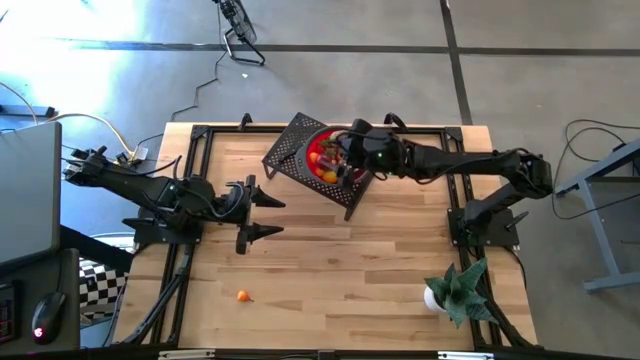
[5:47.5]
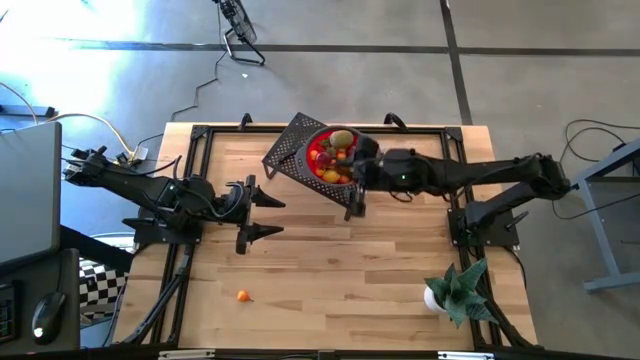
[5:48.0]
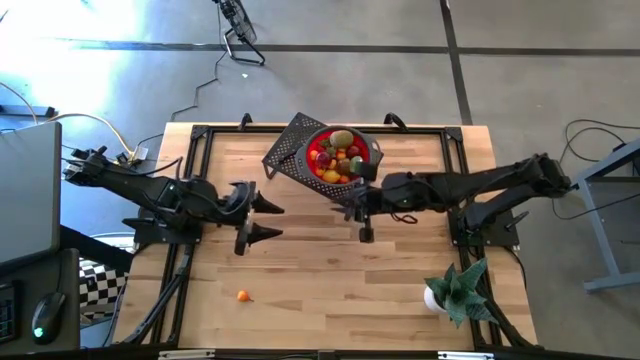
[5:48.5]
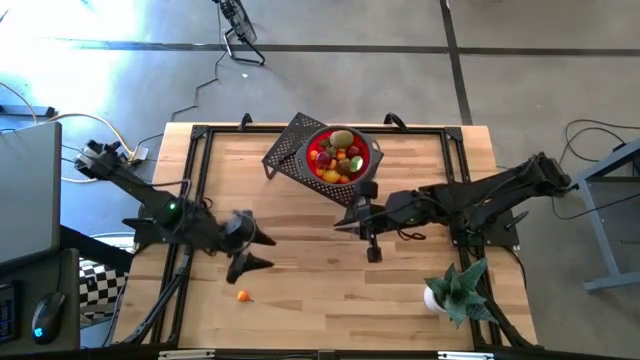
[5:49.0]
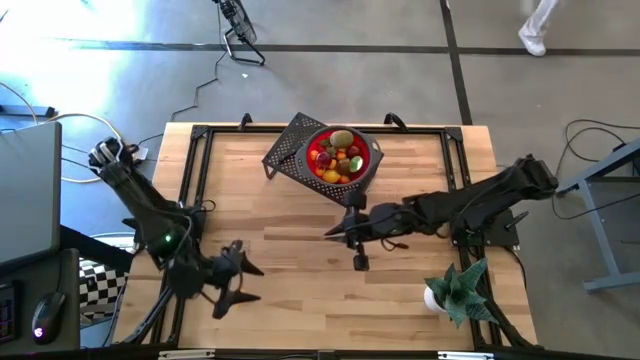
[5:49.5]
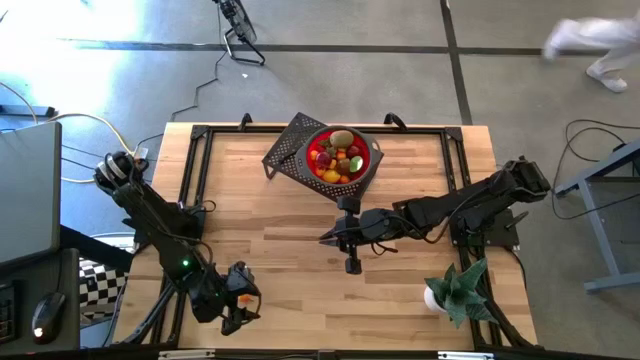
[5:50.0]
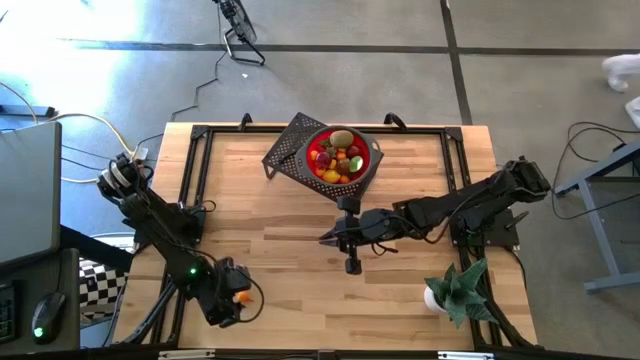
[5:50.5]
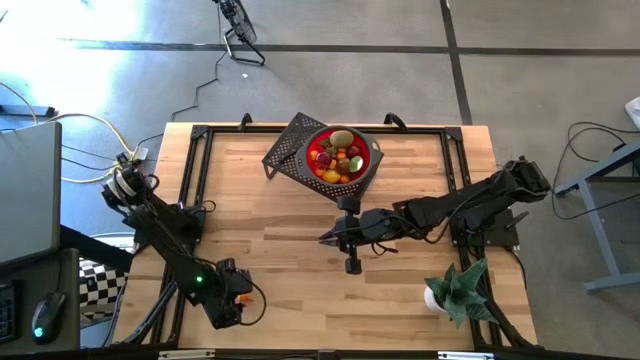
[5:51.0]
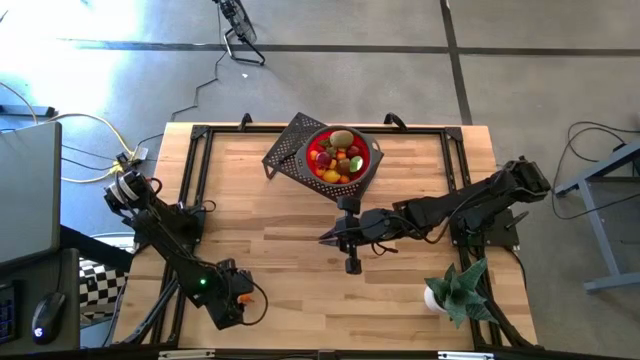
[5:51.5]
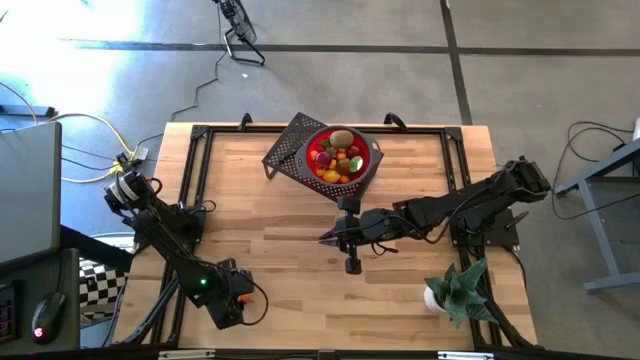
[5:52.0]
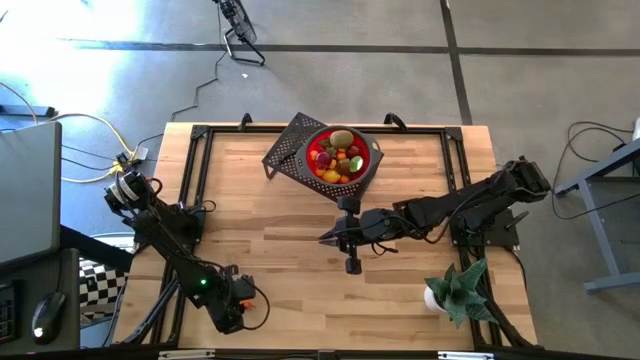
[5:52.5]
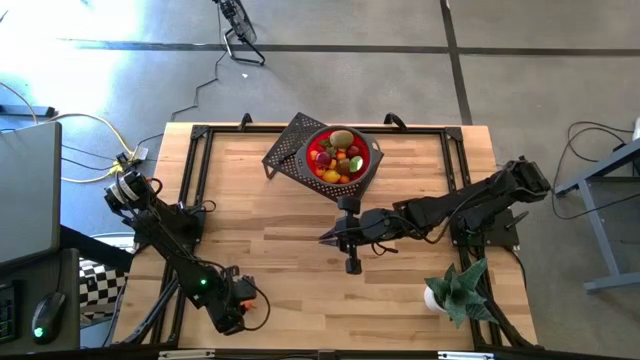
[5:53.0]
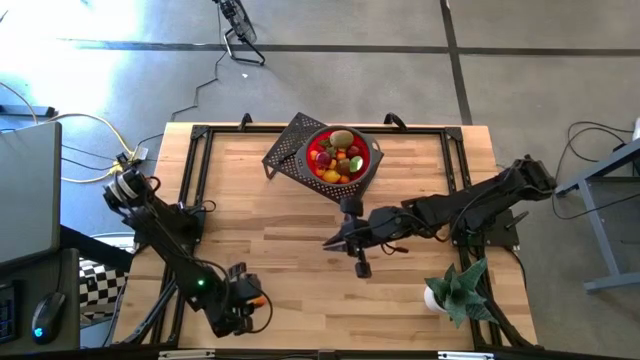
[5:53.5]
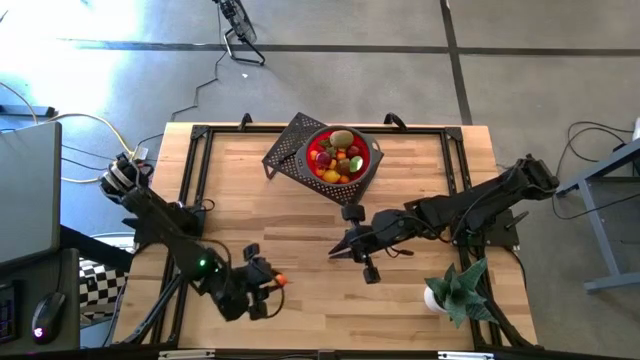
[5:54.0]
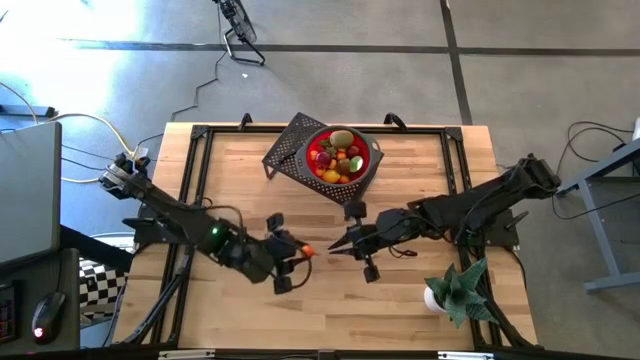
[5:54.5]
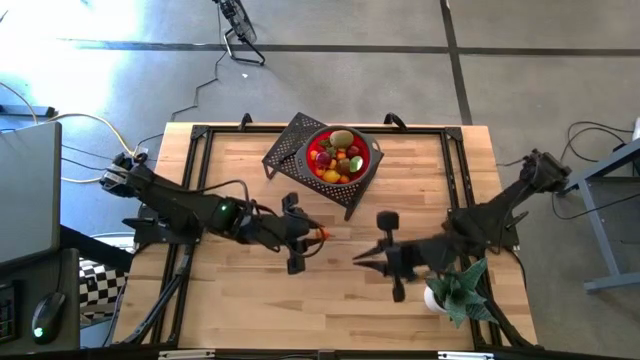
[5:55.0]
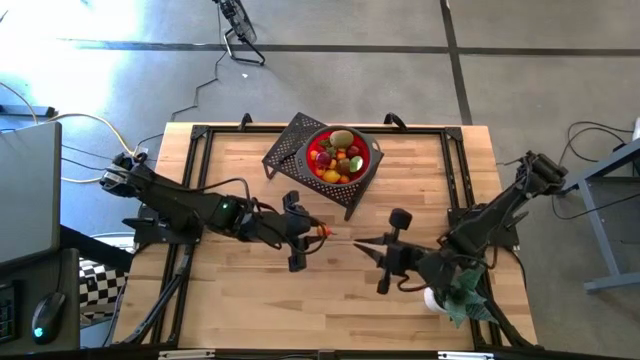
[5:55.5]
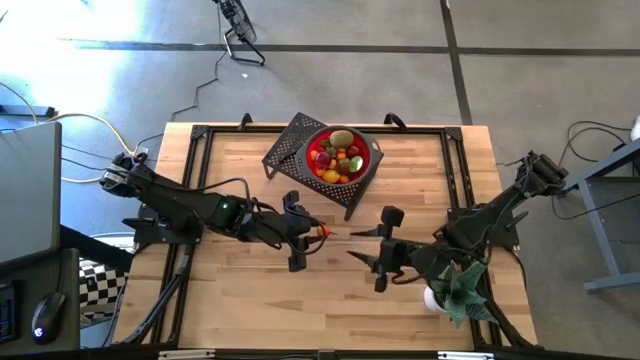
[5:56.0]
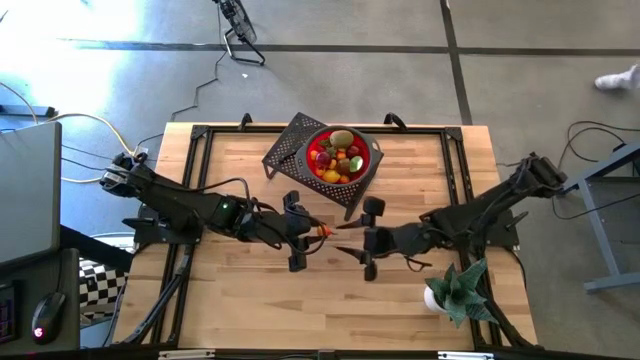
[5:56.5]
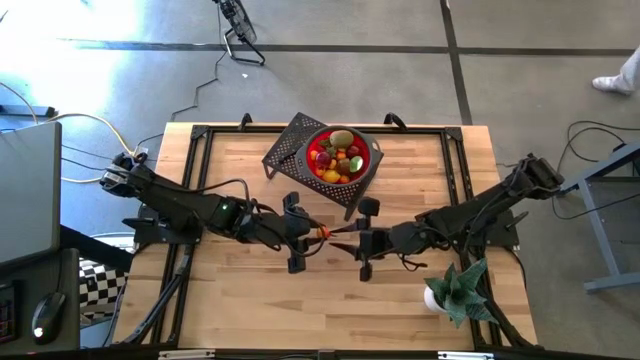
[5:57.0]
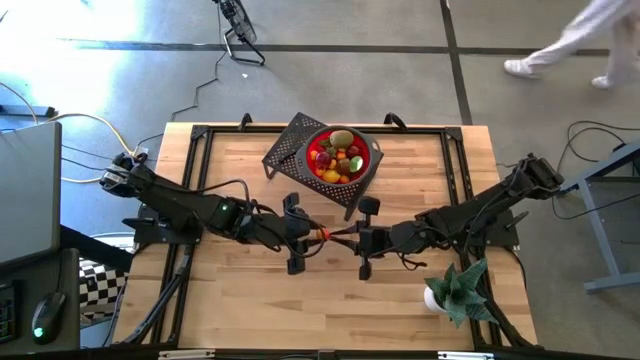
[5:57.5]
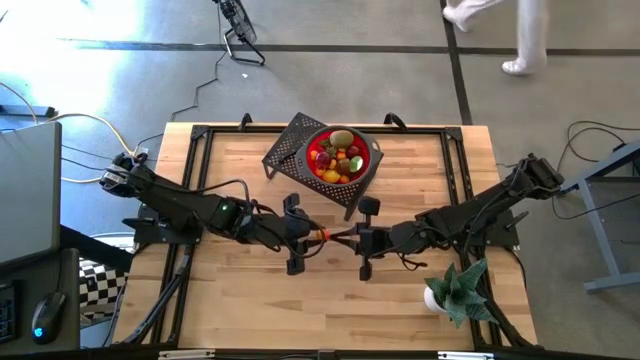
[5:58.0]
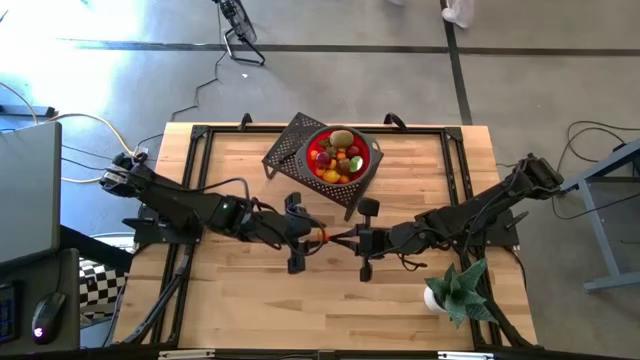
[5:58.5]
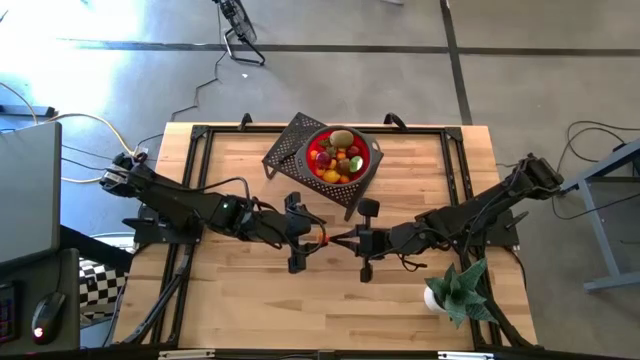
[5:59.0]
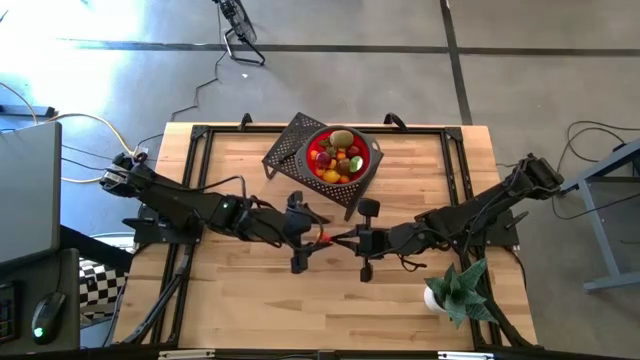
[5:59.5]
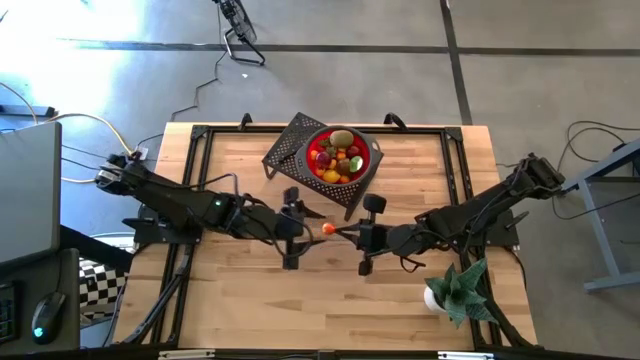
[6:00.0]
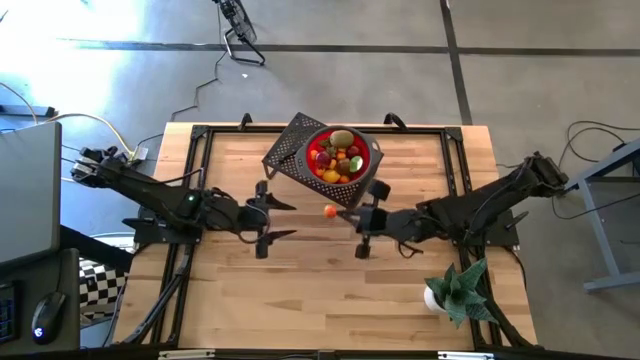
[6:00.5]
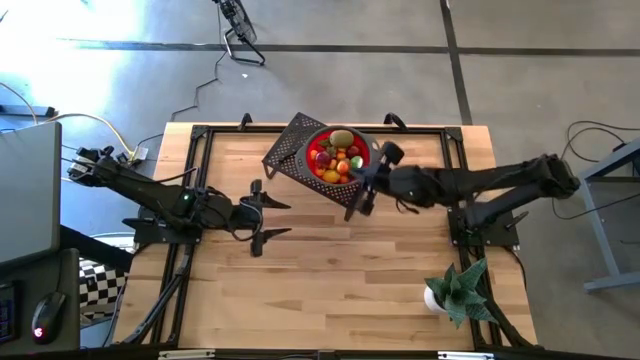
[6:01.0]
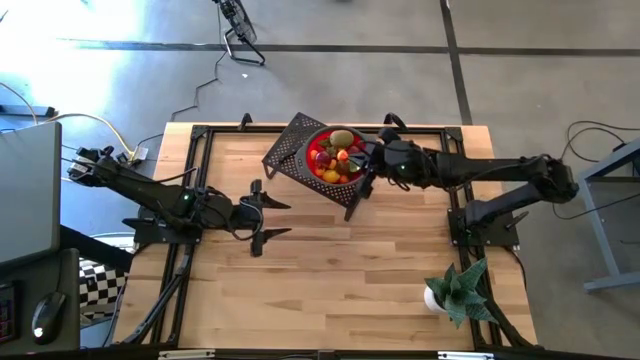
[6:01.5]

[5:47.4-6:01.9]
Task: Pick & Place Fruit
Put the pear into the strainer bowl on the shelf

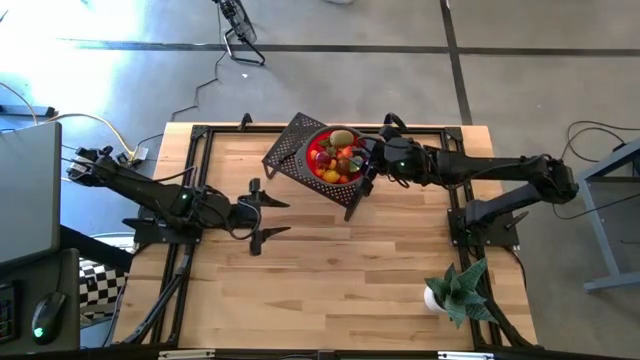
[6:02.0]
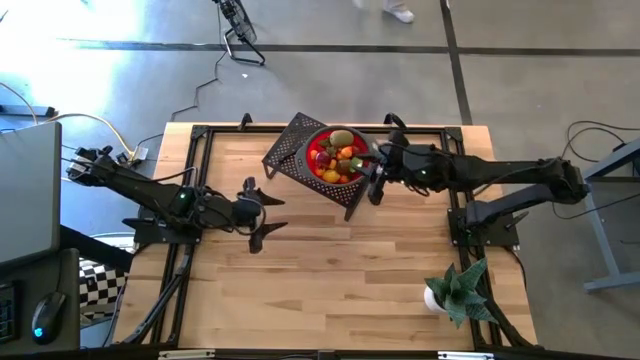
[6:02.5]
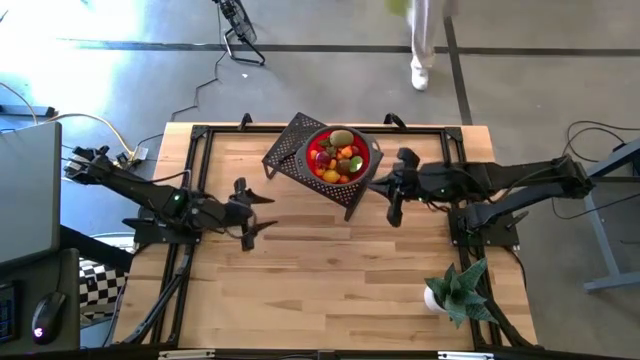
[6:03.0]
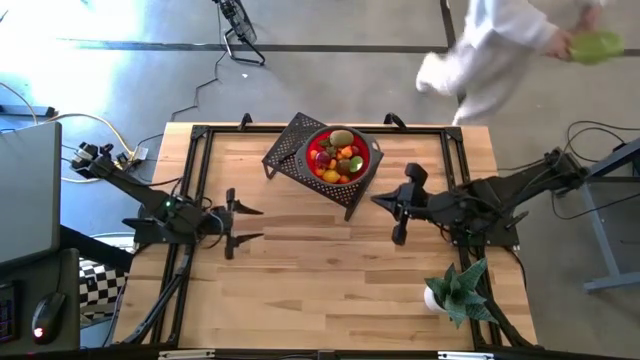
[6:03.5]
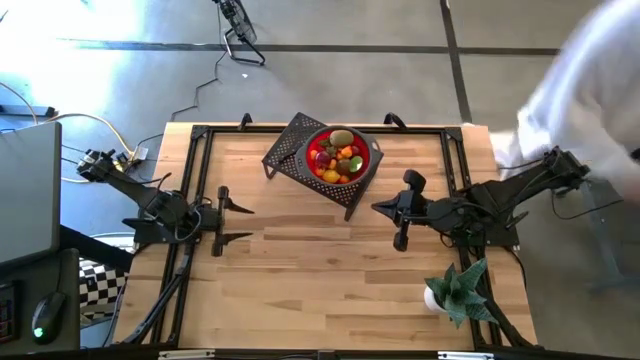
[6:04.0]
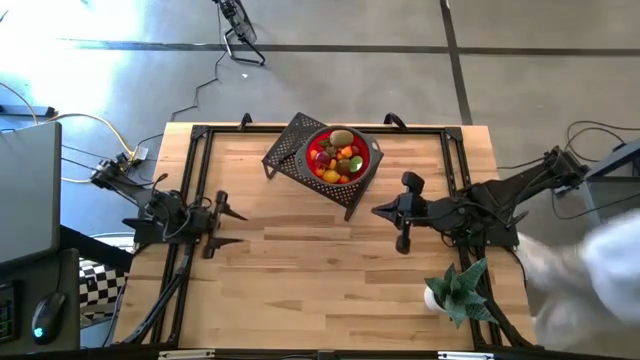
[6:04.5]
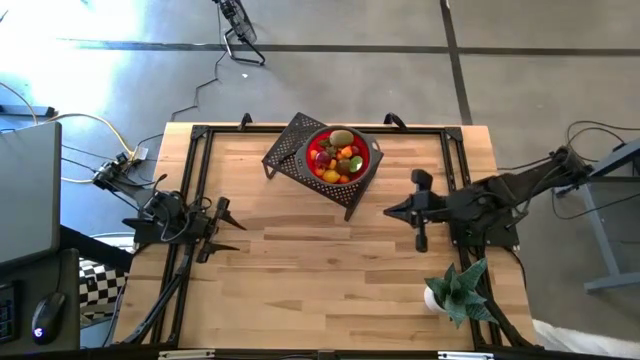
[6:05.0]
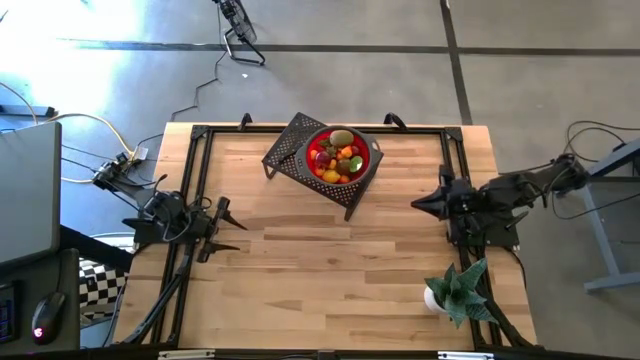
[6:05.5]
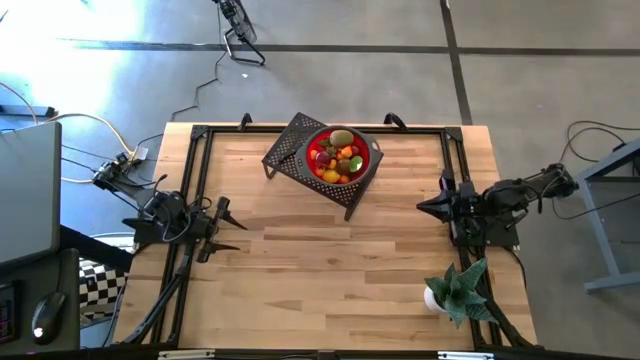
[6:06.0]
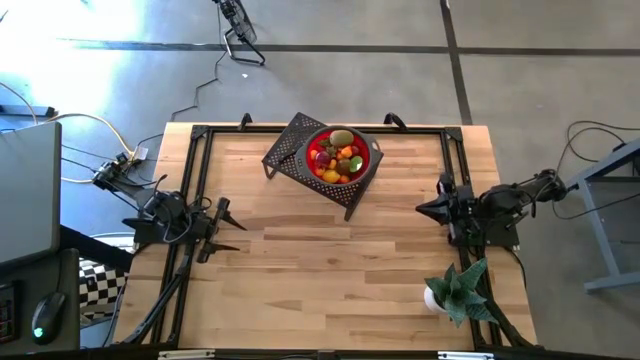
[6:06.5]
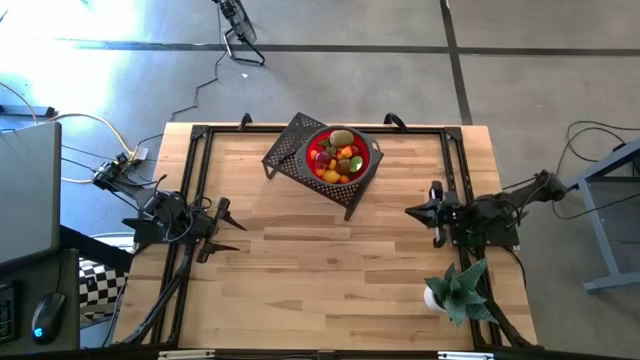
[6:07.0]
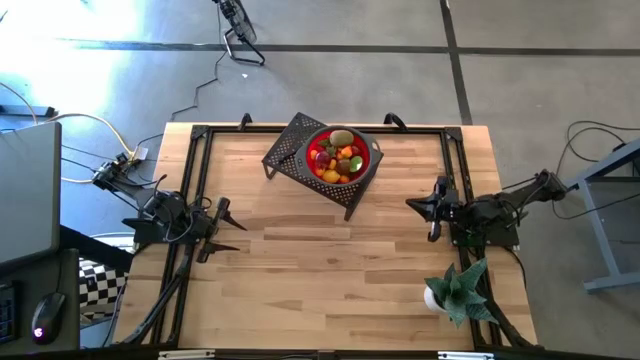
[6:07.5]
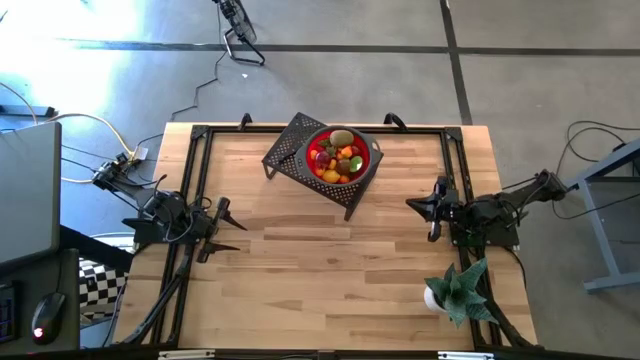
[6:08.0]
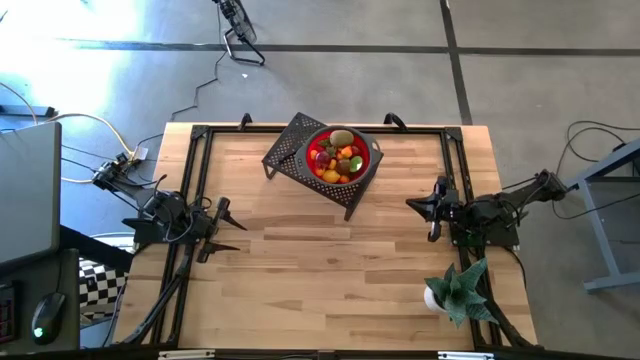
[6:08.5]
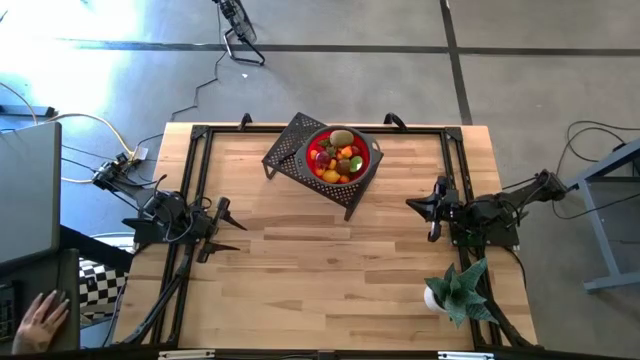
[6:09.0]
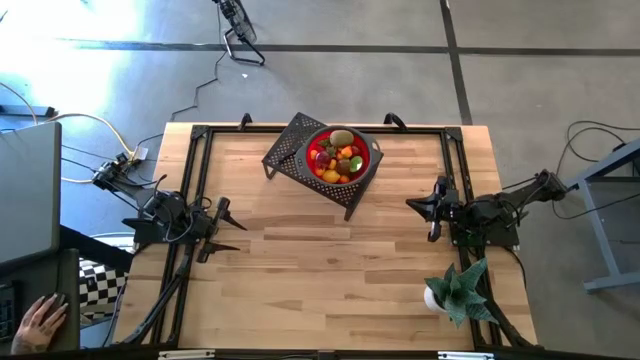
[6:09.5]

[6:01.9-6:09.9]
Return to Home Position
